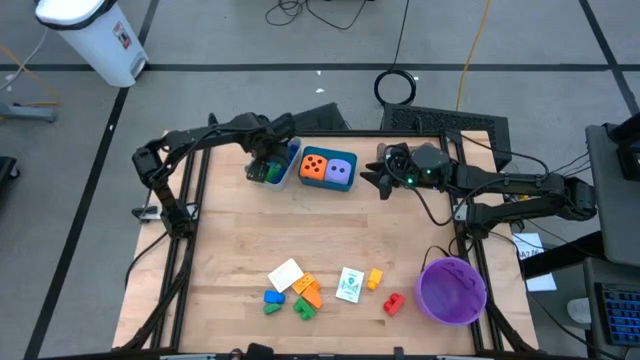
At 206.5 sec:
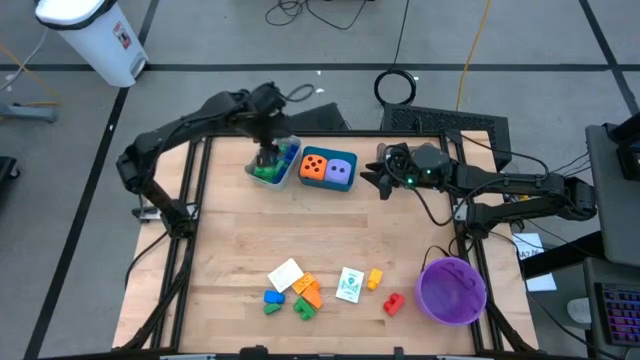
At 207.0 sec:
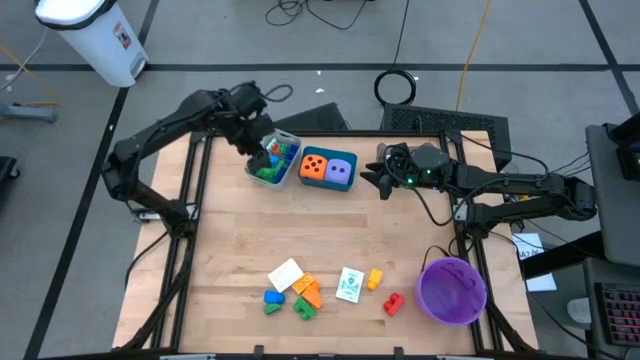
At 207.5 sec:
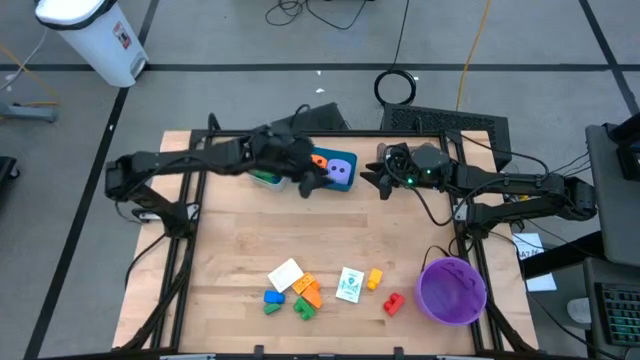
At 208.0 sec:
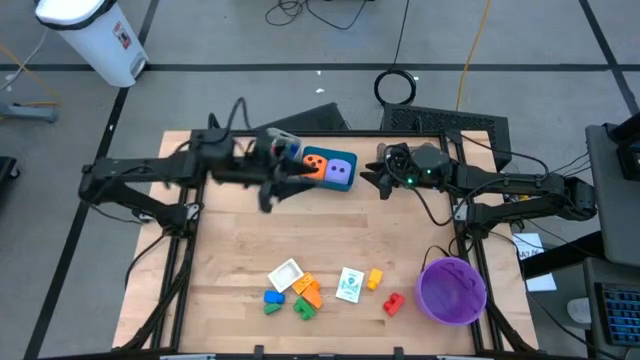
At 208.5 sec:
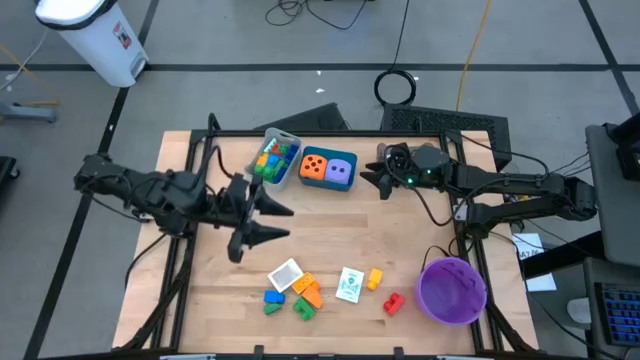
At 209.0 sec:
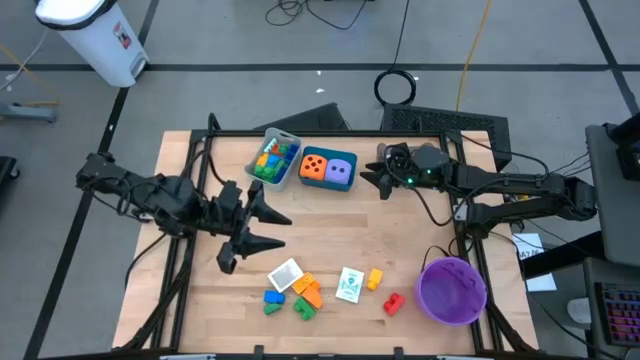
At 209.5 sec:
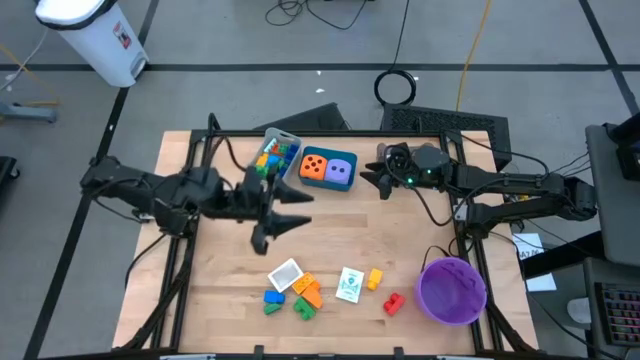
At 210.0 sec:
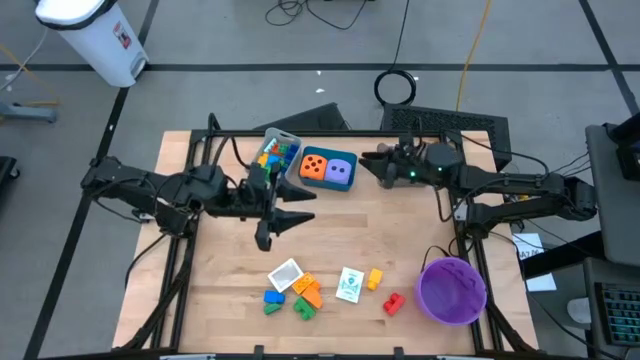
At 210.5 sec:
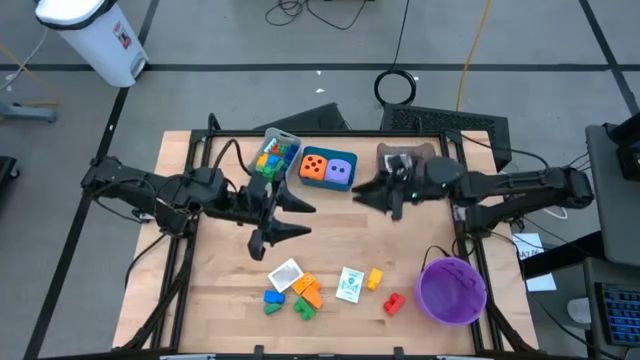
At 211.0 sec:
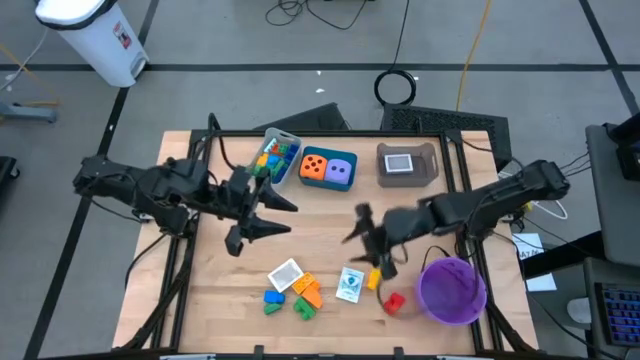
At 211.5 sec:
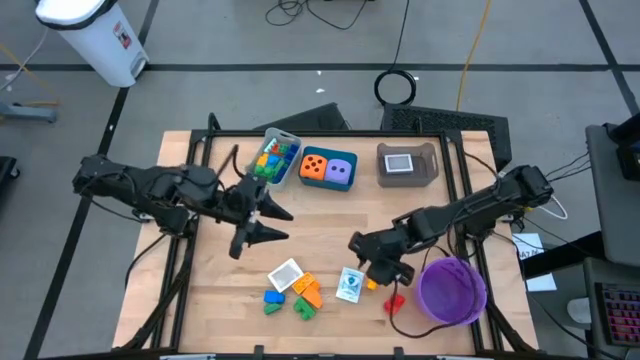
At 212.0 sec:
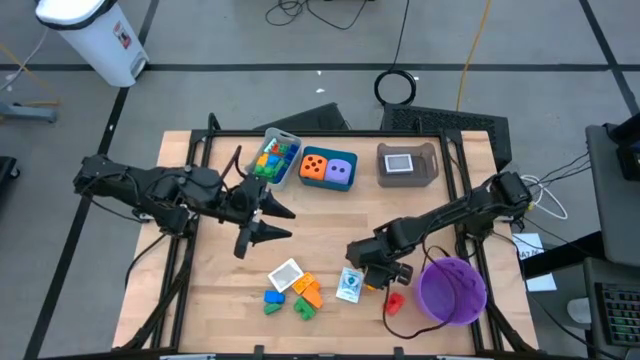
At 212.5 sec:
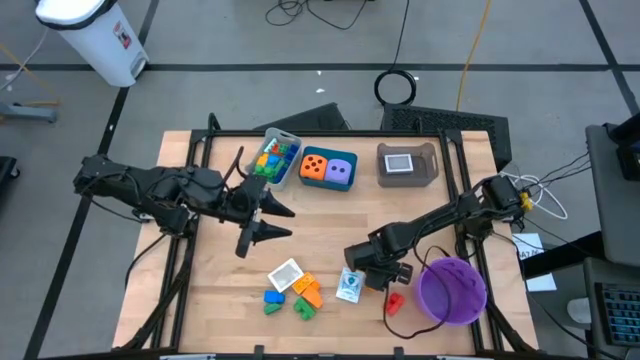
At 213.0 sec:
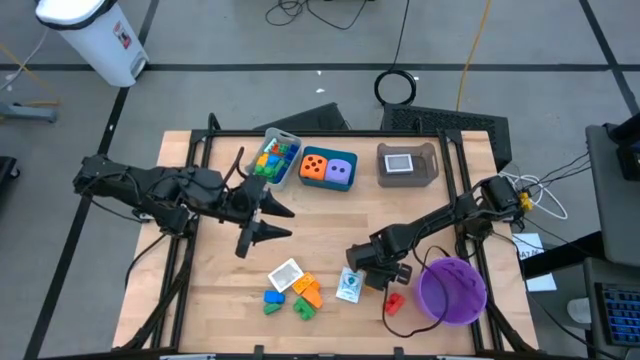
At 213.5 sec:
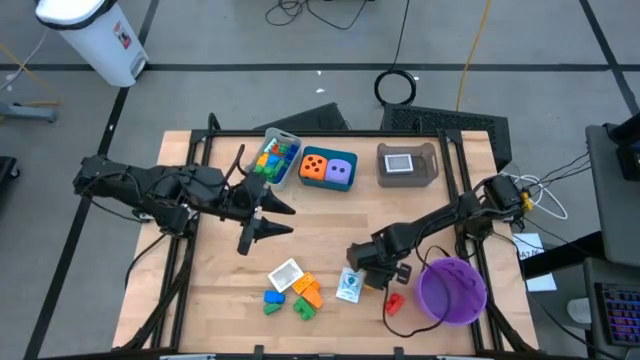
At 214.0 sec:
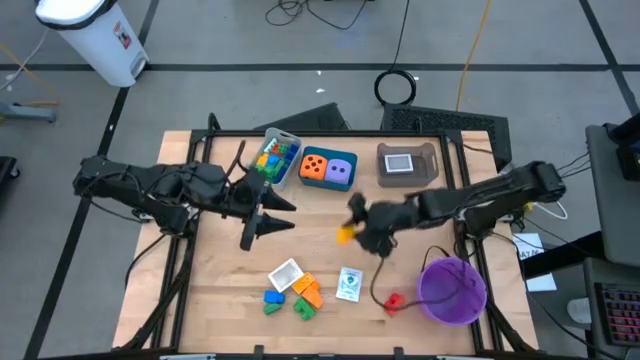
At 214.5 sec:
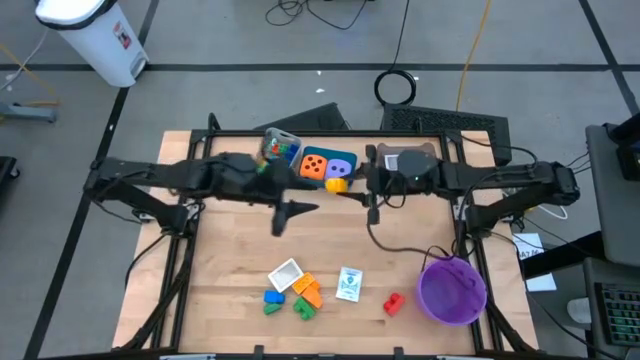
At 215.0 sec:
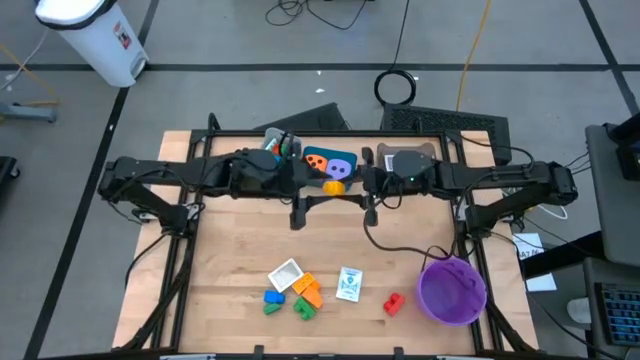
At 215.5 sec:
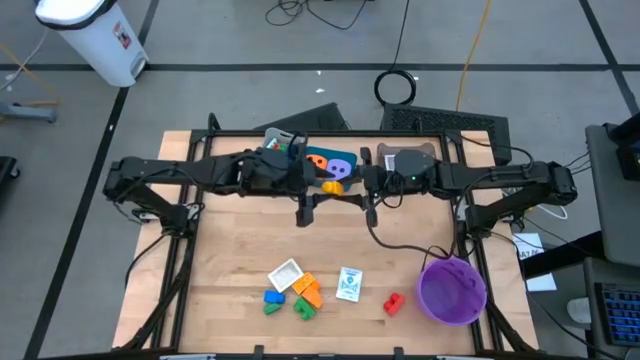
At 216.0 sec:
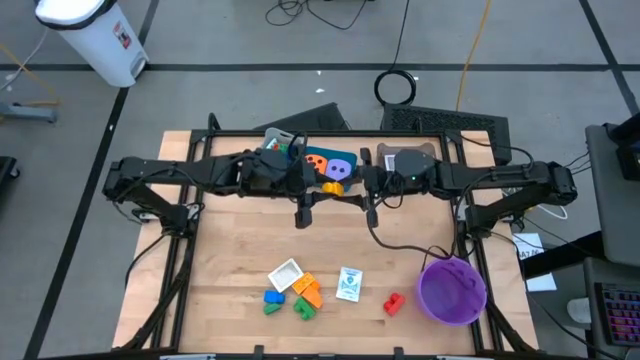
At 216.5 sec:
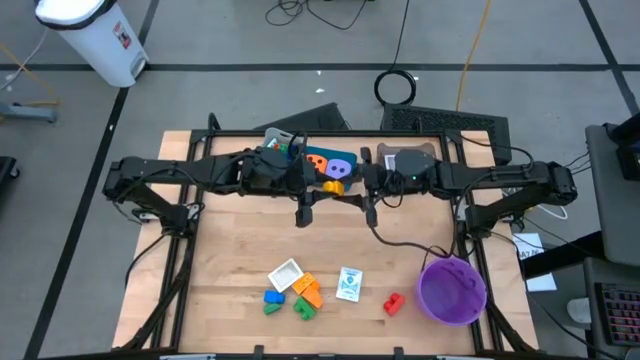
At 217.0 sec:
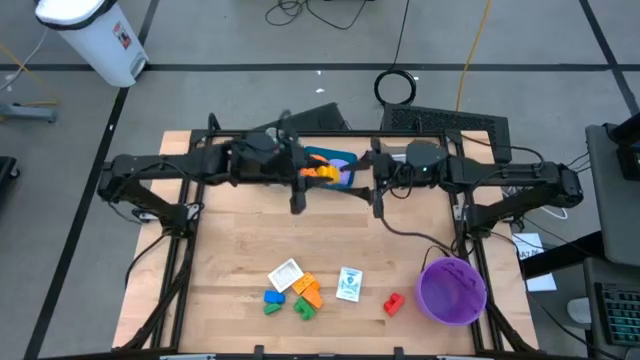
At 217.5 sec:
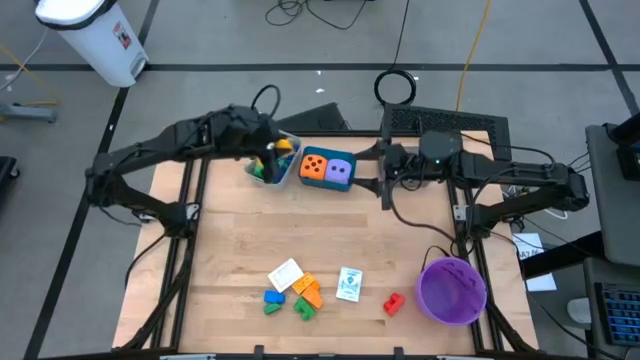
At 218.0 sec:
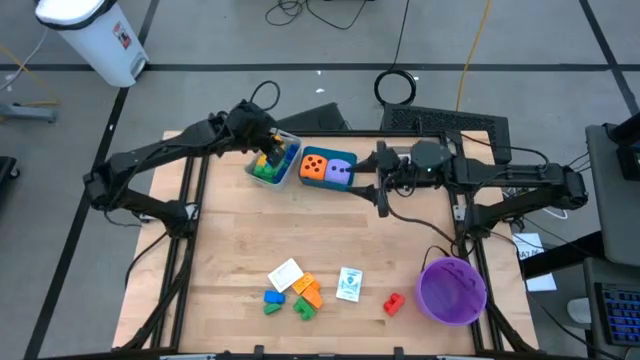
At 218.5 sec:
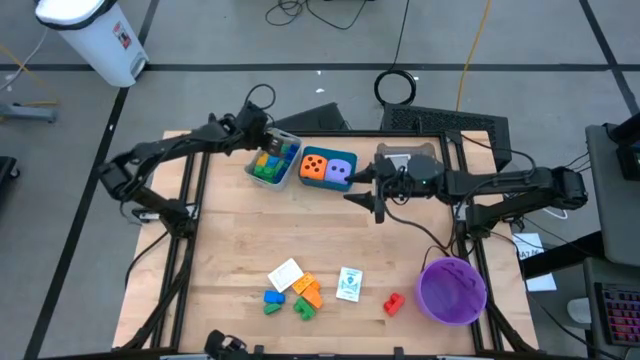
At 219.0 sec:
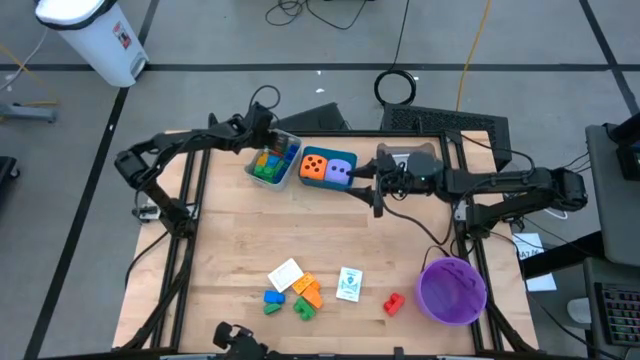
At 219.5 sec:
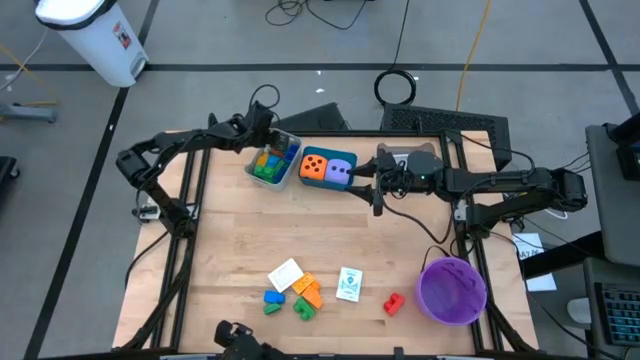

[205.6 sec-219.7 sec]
Task: Pick & Place Toys
Put the yellow game piece into the gray bin

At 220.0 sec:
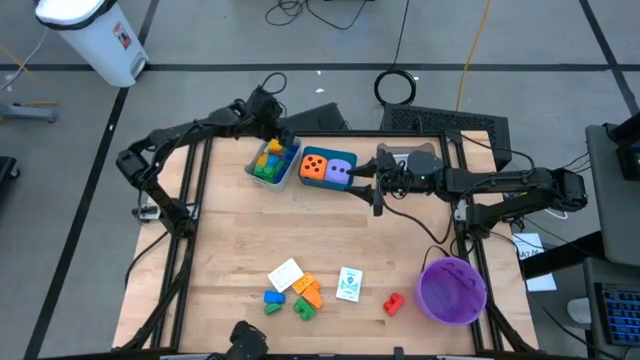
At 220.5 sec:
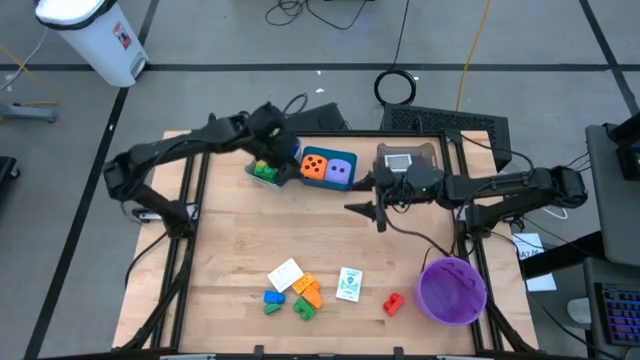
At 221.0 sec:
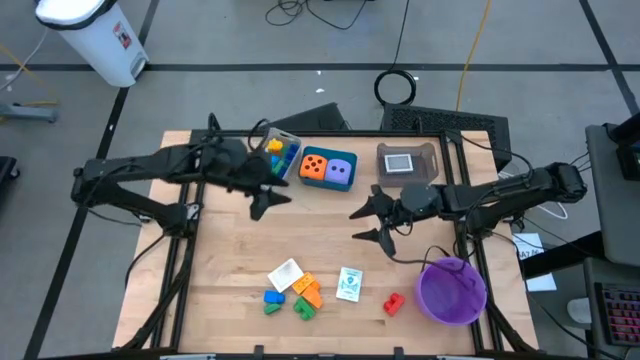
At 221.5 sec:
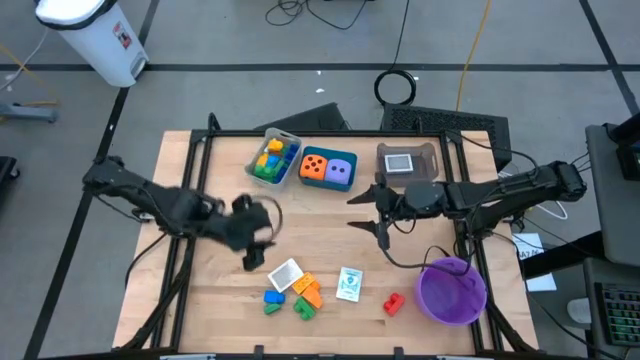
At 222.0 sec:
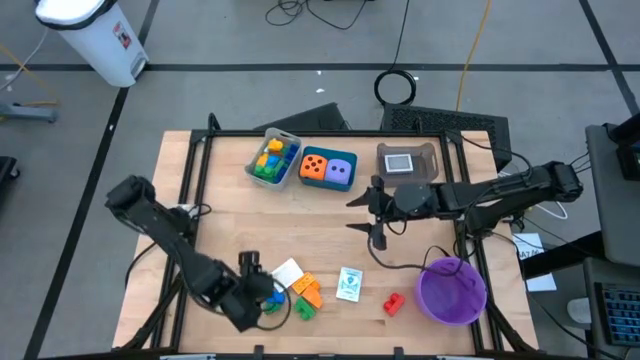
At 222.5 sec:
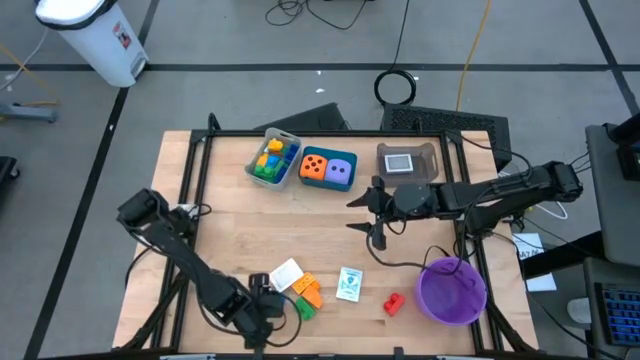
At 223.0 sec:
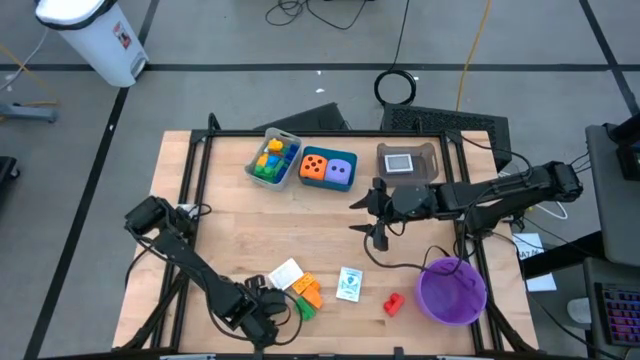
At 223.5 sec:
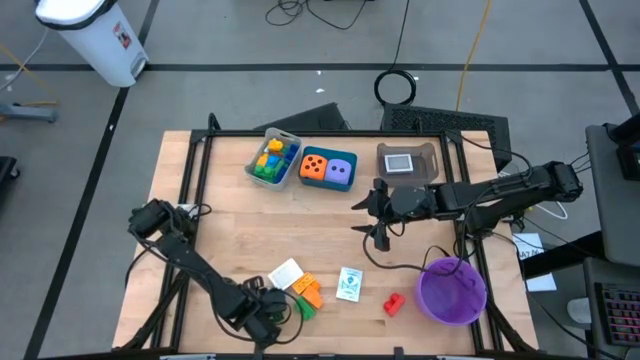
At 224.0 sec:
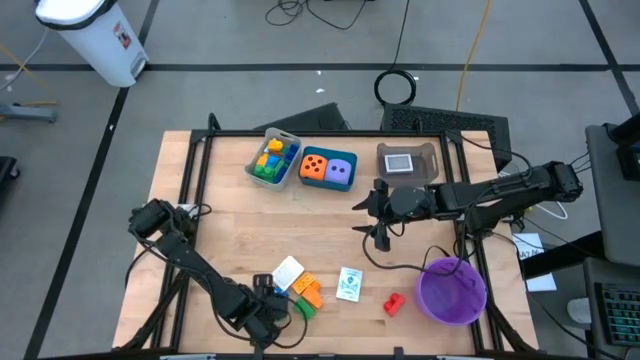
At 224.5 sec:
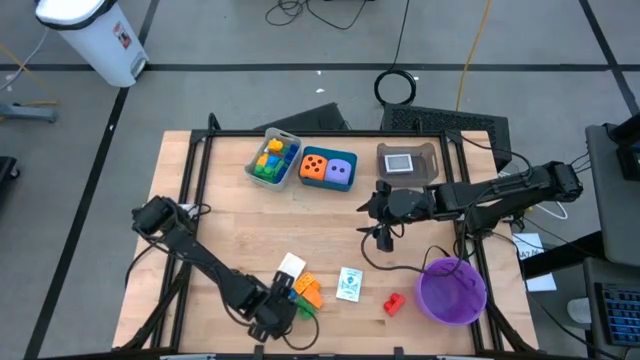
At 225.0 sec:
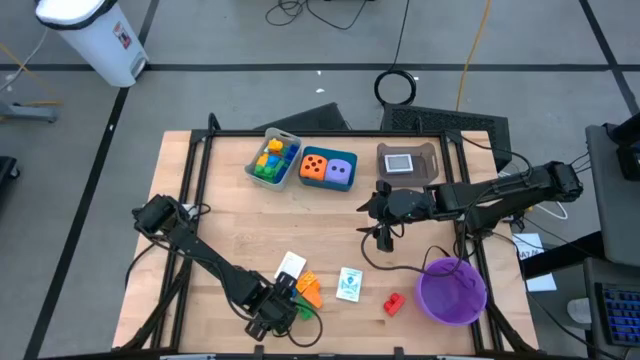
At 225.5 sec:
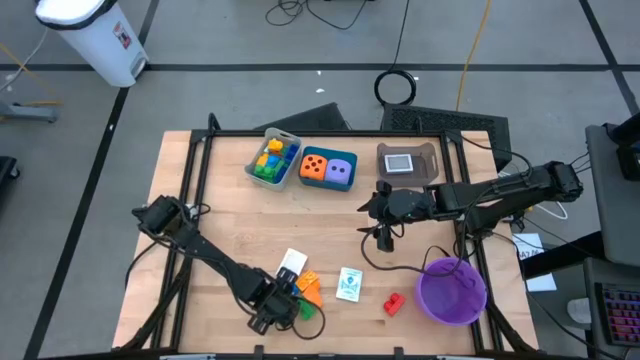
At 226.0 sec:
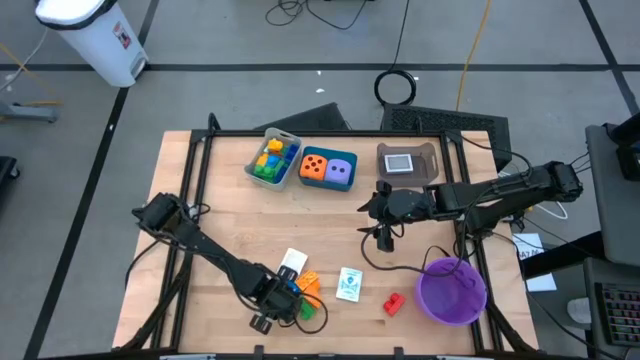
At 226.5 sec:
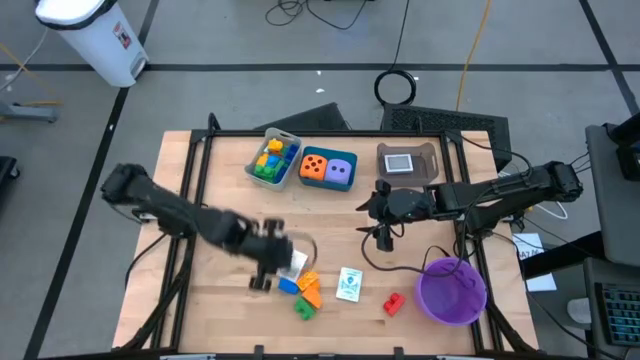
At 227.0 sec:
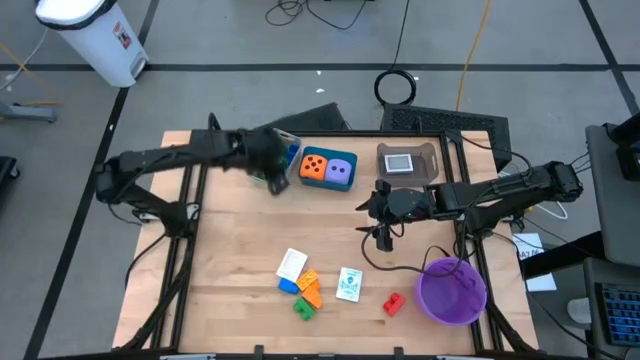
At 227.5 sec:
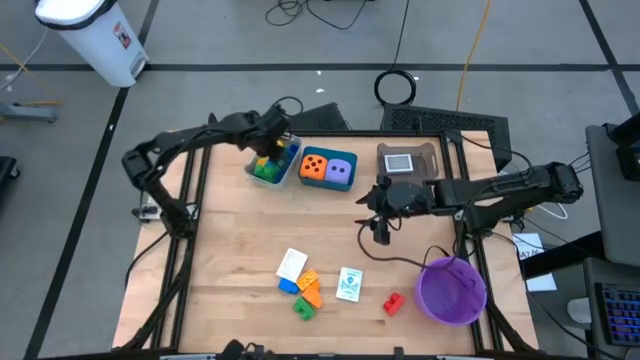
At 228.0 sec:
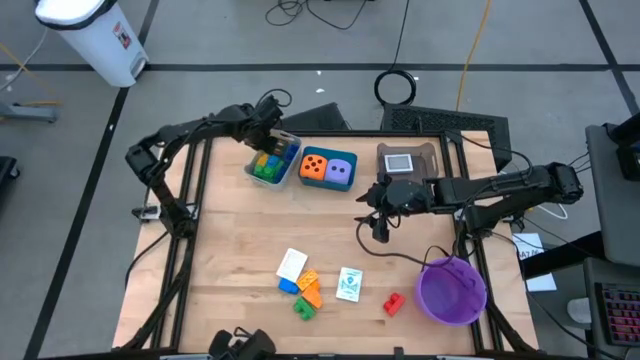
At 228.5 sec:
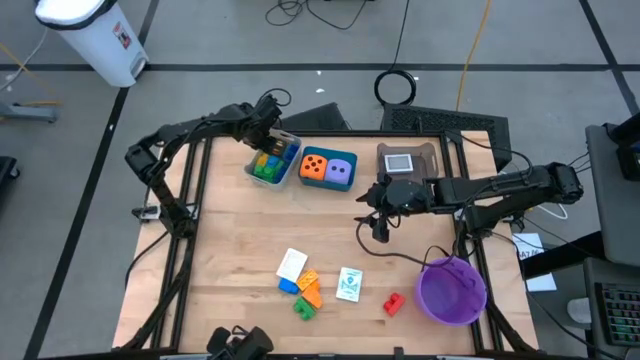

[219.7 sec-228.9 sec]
Put the green game piece into the gray bin
